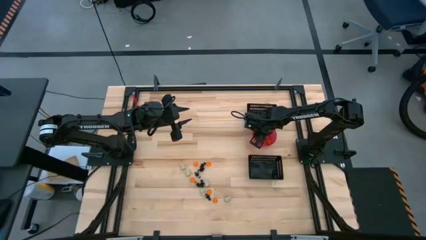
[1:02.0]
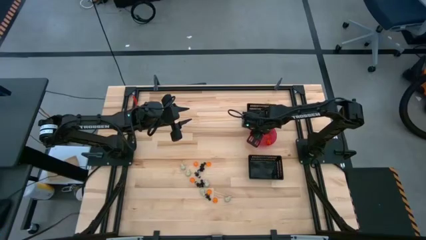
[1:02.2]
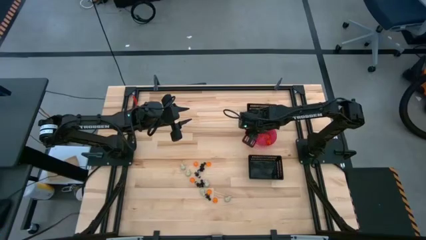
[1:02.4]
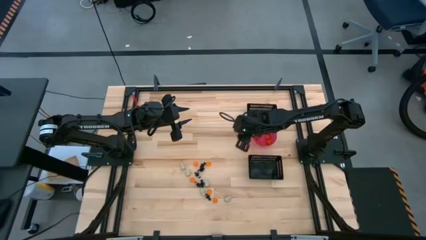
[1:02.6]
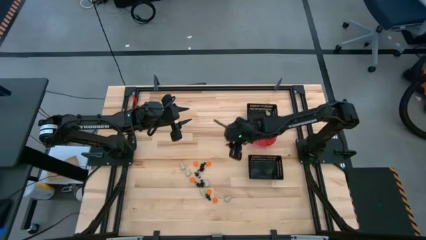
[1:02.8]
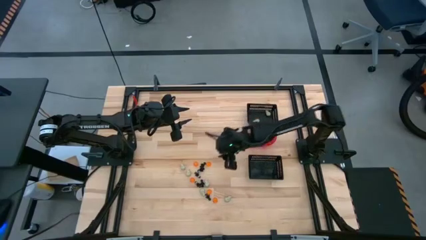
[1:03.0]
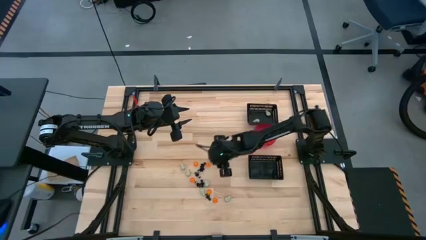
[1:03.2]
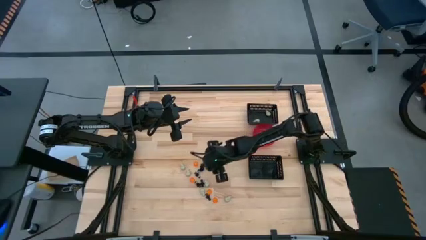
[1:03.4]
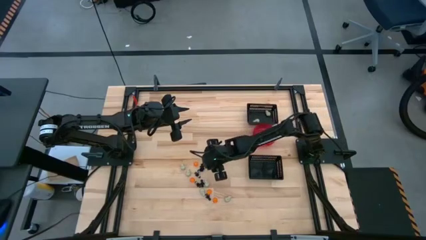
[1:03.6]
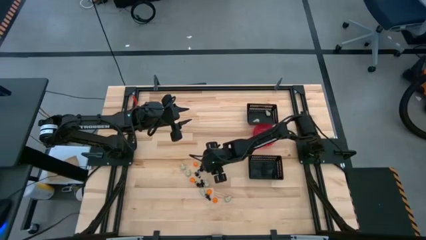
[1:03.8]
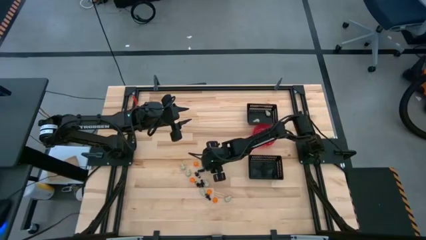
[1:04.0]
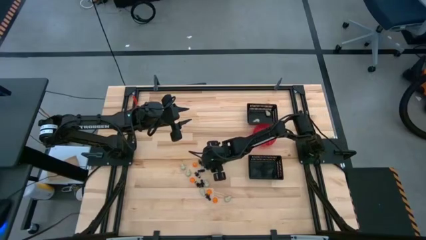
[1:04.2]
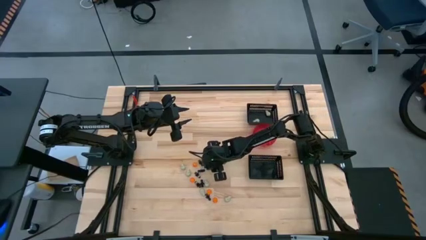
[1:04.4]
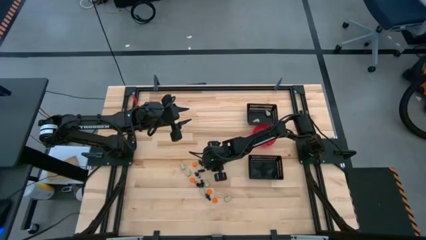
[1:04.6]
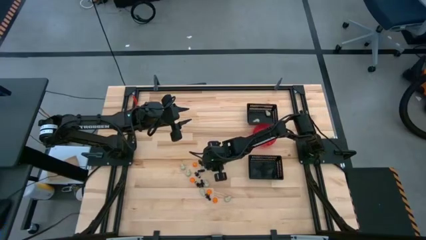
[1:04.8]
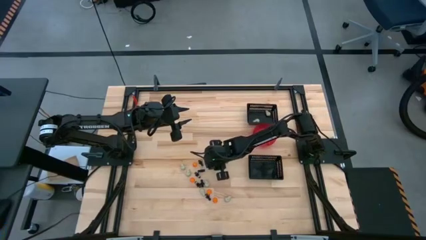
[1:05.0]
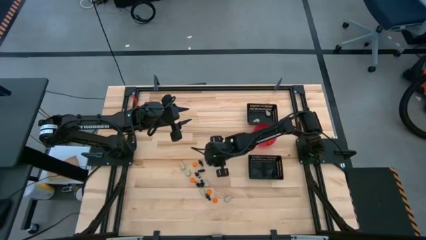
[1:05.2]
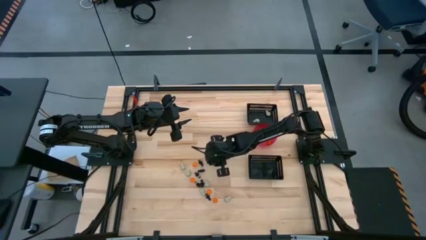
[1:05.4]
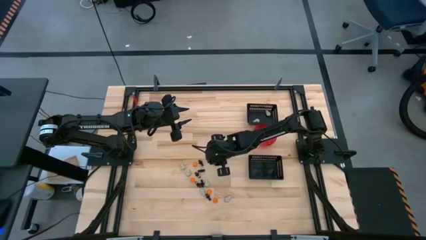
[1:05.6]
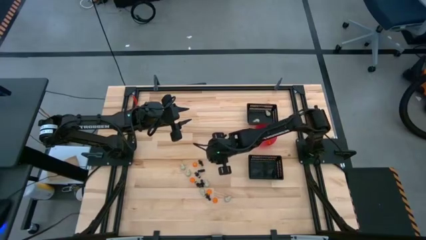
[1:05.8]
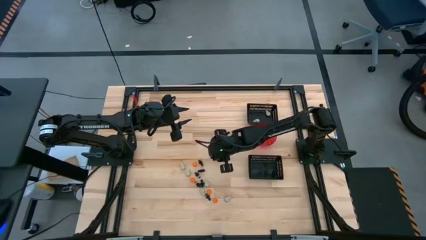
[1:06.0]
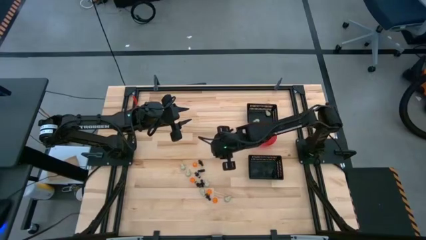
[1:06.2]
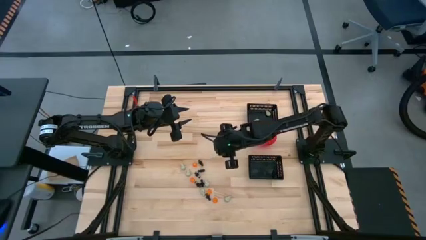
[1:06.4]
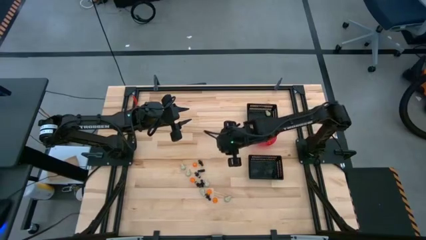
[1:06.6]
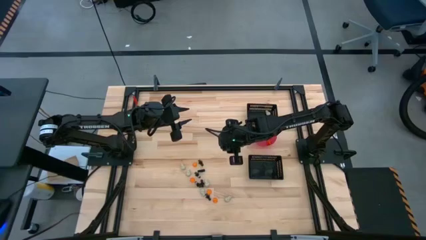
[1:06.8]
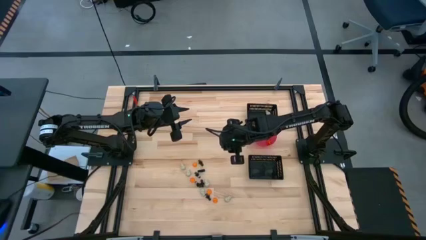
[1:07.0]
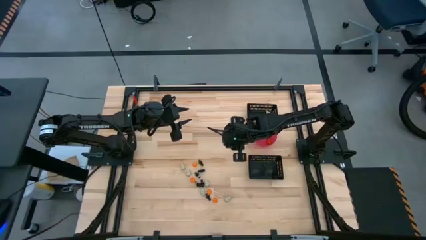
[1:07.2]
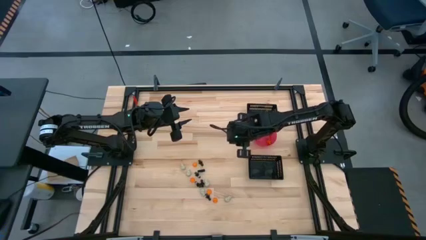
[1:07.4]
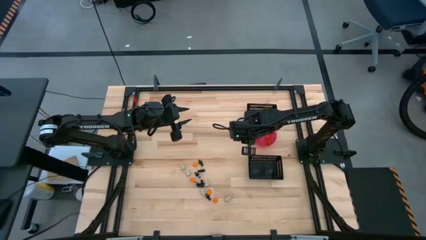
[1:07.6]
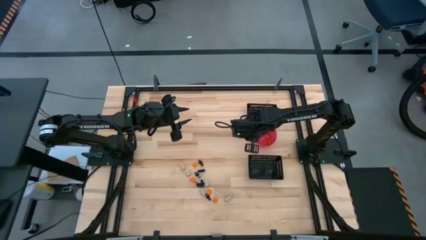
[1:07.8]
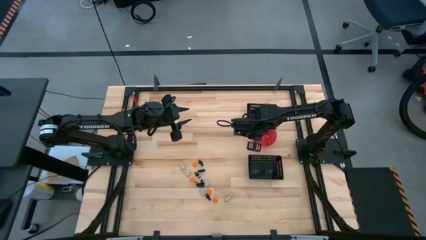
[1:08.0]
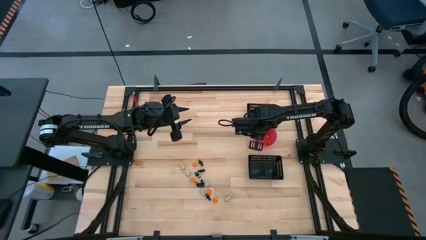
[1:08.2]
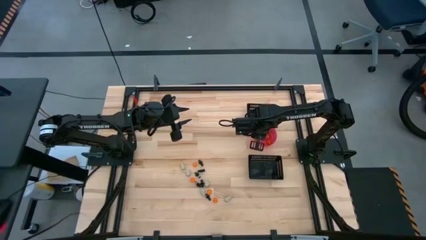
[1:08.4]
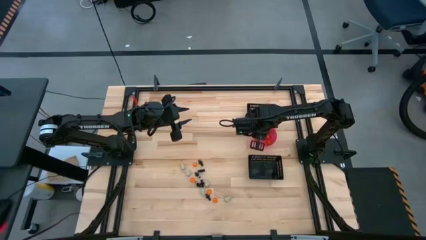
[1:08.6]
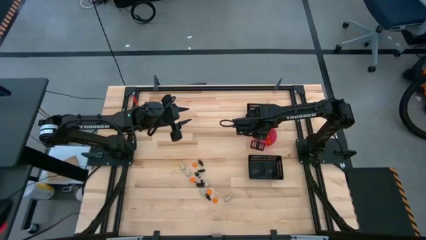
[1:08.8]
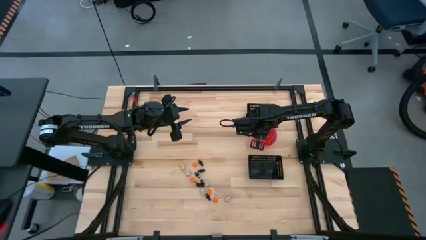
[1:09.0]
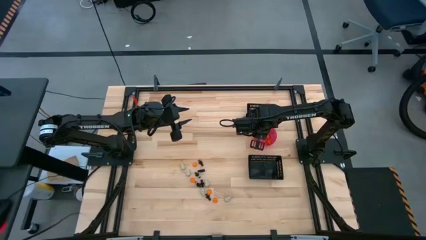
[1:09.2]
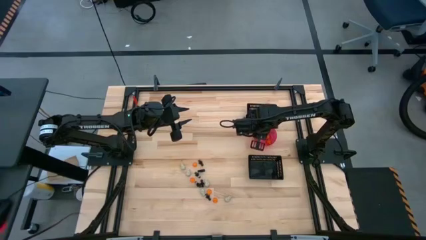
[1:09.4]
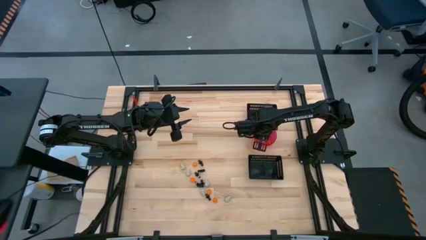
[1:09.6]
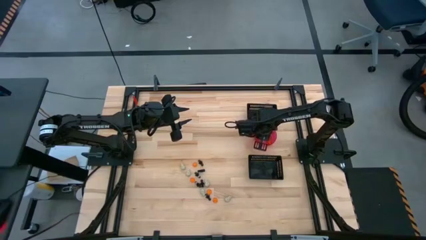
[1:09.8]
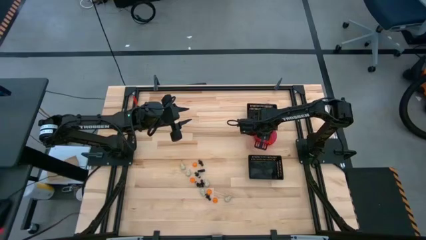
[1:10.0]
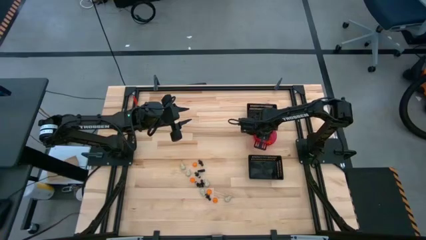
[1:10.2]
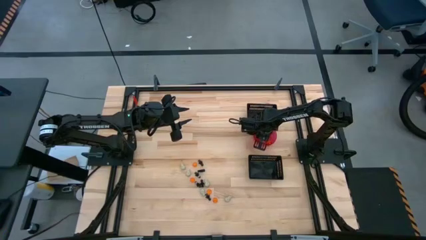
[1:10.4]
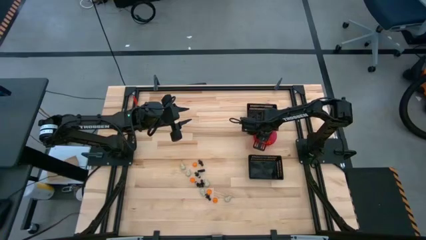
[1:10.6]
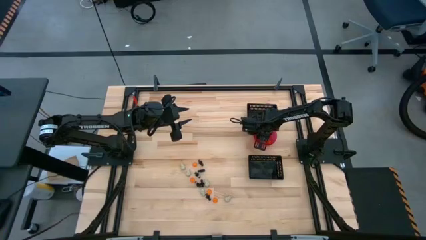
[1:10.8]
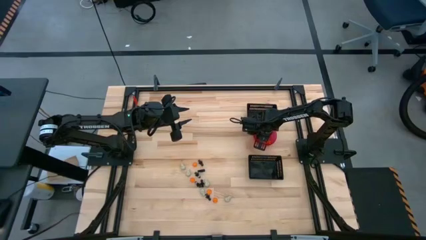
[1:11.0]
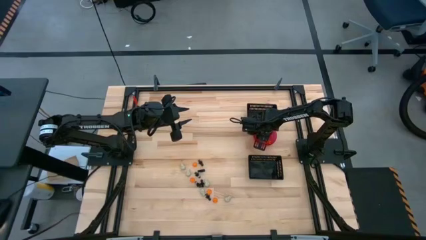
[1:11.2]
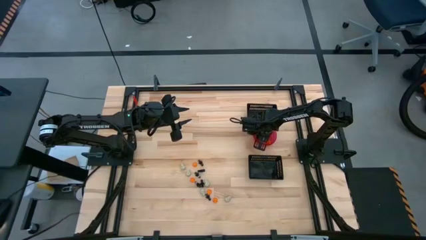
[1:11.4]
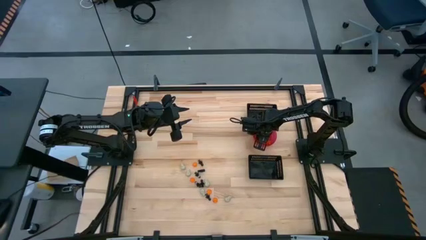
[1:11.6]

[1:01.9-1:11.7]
Task: Sort Halloween decoration
Put the orange pumpkin toy into the pink bowl

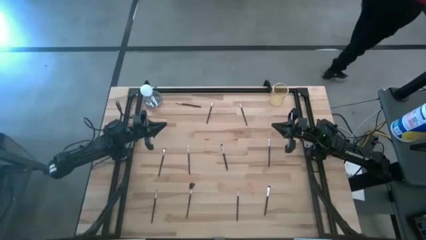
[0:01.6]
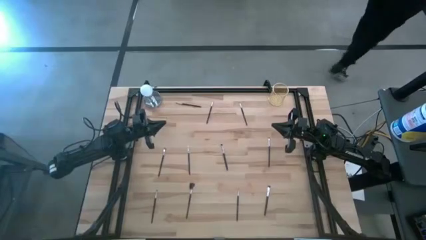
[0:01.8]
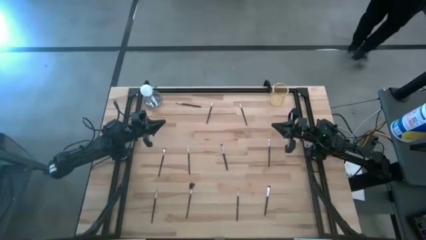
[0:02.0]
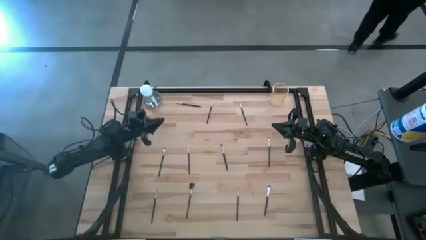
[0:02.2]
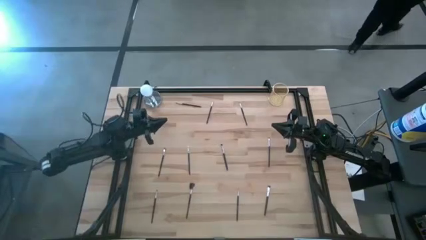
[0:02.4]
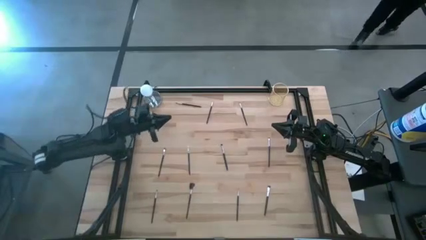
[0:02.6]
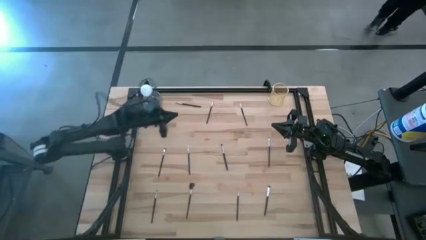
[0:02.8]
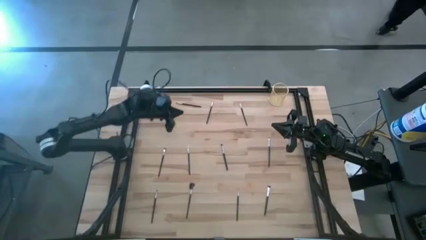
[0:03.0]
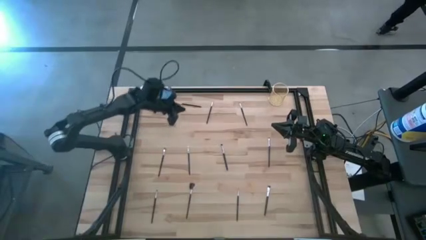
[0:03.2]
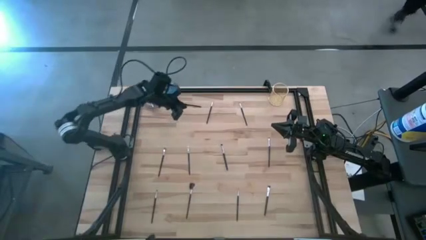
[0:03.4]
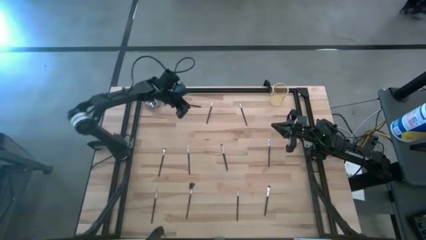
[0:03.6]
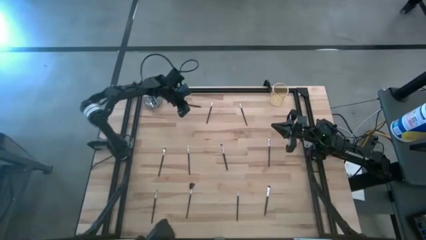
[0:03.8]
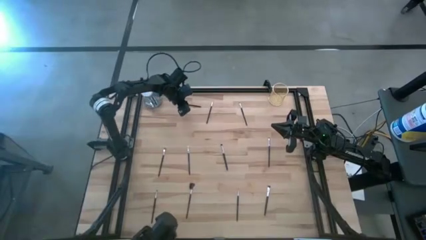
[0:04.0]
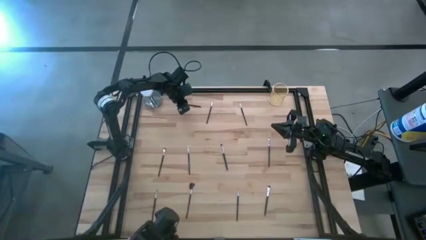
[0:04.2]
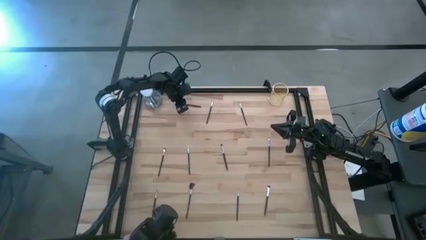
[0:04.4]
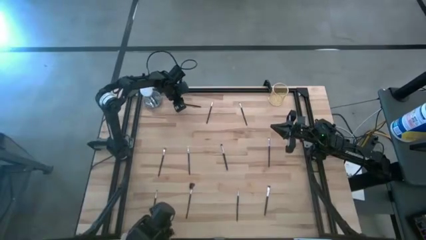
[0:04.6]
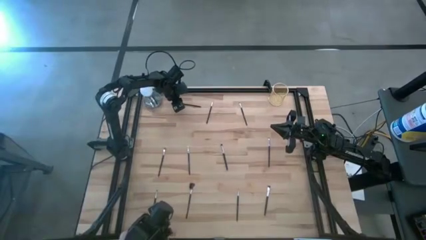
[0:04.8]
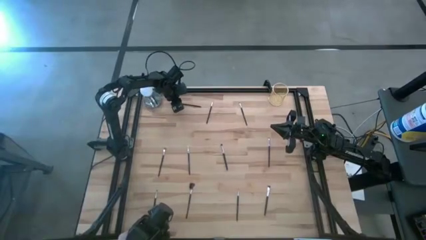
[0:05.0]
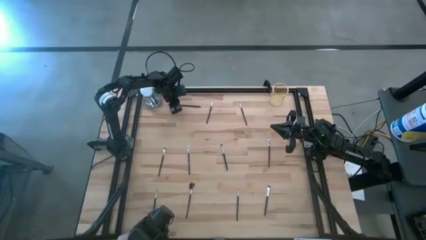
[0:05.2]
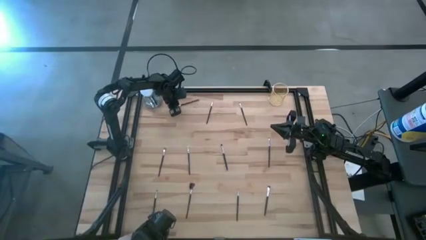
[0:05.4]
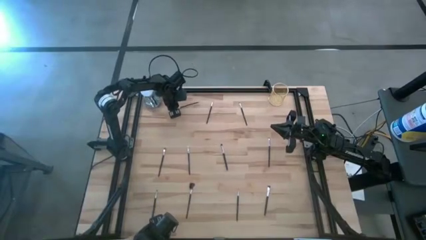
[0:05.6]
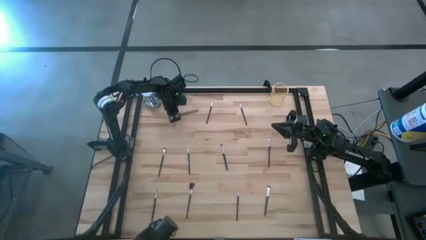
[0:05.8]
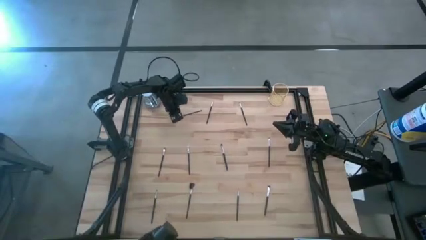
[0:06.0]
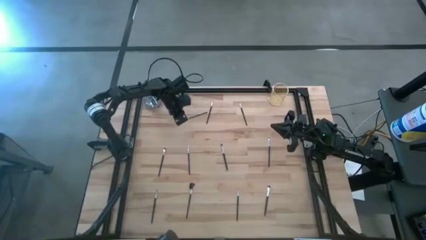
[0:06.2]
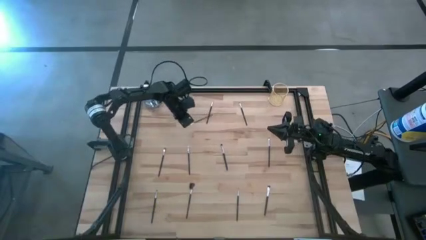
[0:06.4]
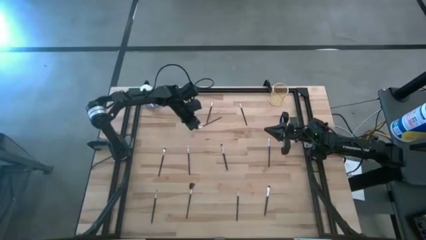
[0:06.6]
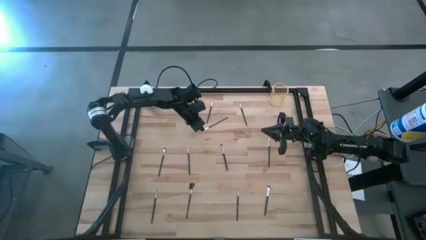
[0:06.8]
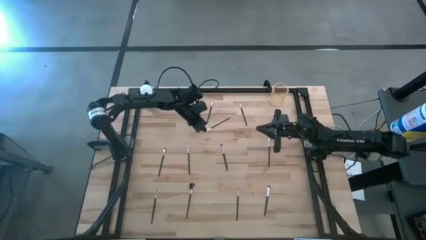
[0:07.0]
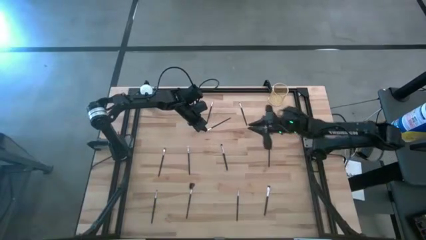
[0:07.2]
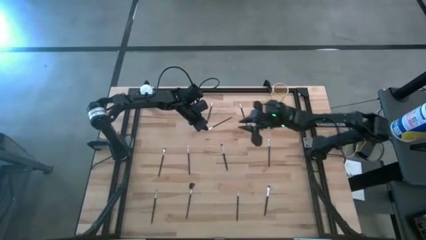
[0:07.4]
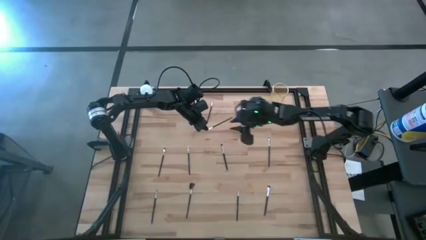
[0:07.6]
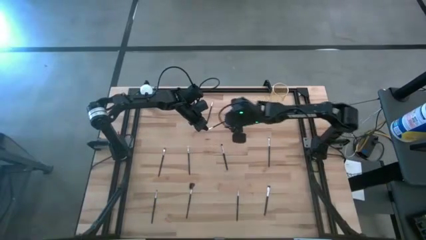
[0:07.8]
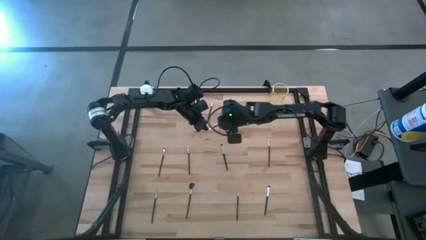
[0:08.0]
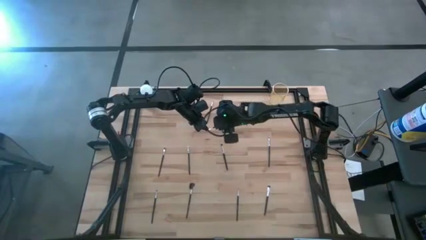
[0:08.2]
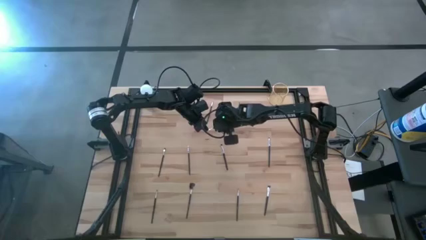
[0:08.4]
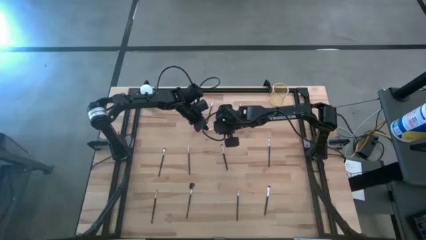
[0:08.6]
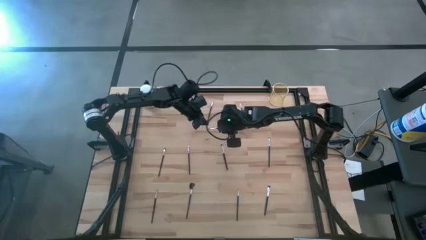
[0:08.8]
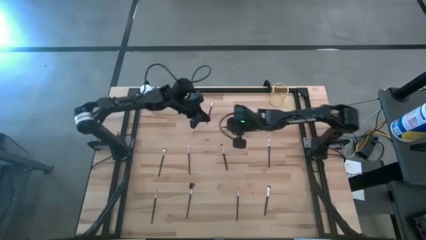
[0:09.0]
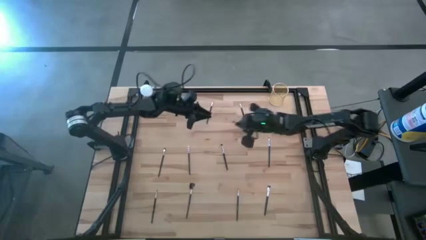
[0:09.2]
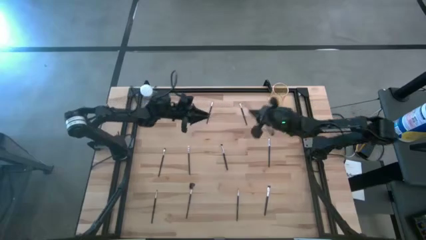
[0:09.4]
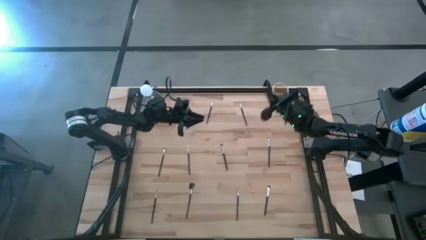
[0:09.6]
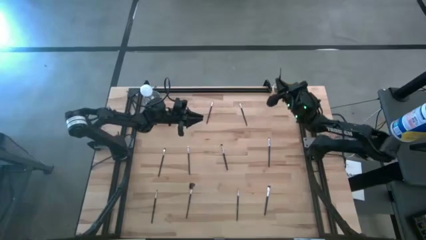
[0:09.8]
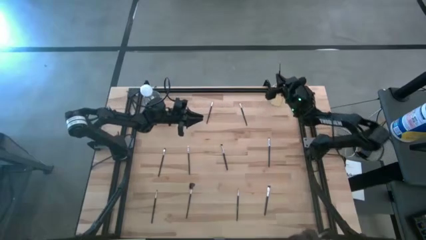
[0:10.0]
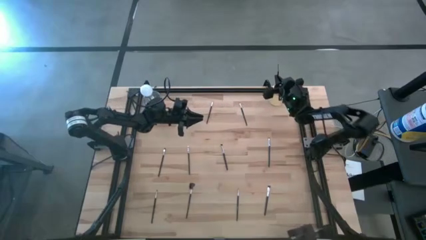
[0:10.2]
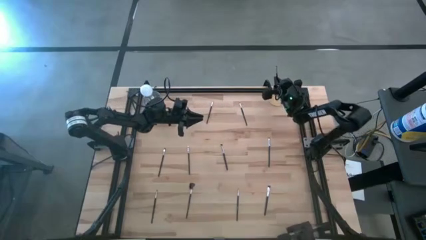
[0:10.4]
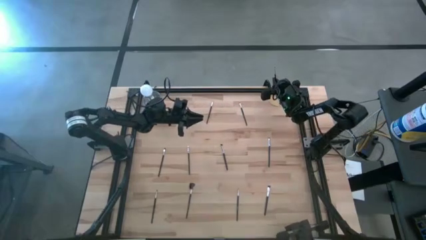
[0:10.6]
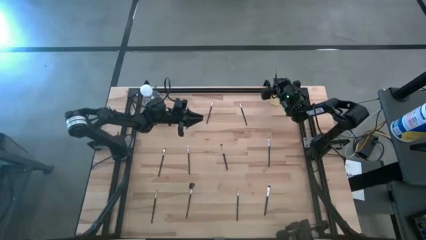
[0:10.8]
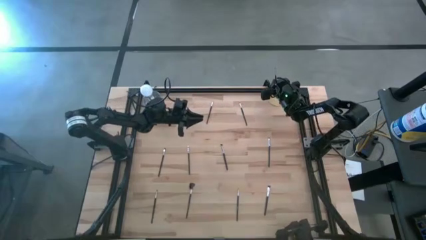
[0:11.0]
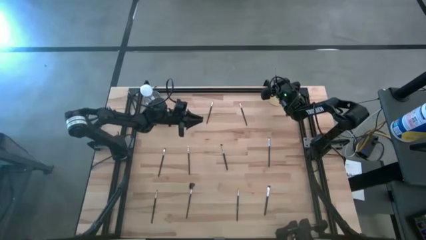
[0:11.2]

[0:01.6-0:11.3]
Task: Sort items
Put the black eyeshadow brush into the gold holder
